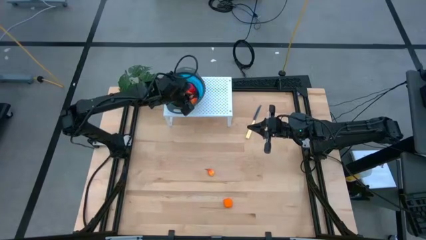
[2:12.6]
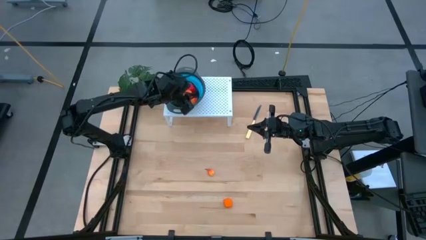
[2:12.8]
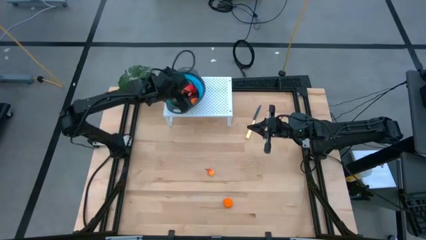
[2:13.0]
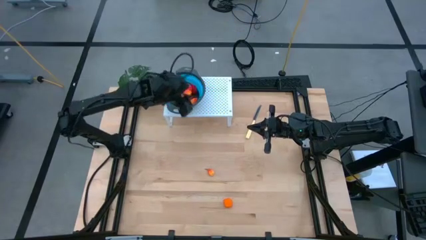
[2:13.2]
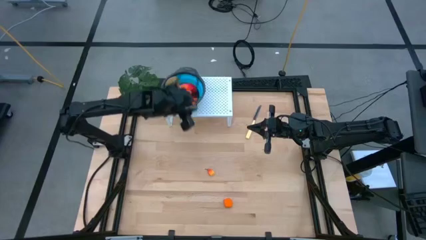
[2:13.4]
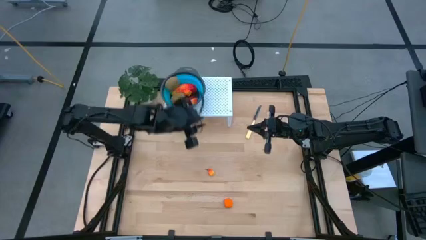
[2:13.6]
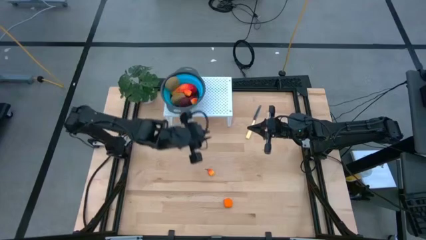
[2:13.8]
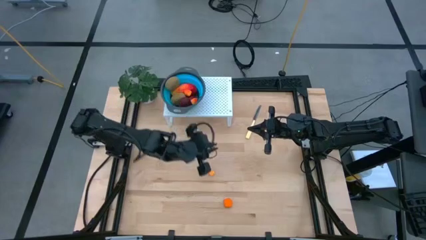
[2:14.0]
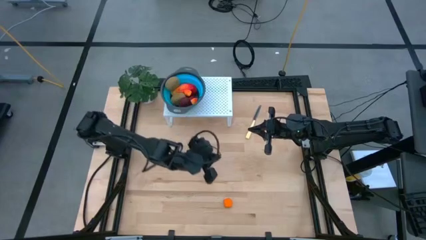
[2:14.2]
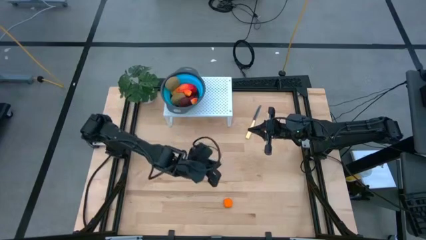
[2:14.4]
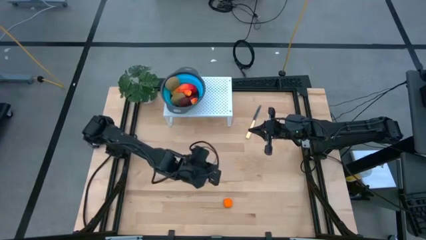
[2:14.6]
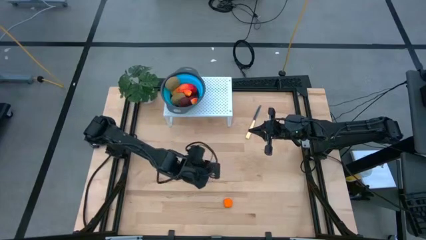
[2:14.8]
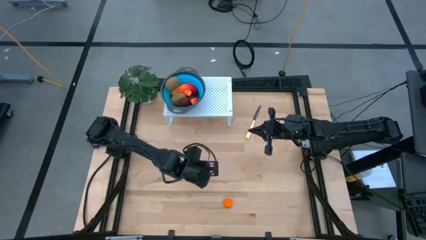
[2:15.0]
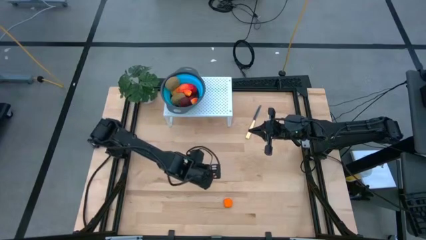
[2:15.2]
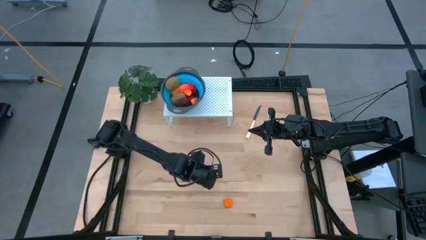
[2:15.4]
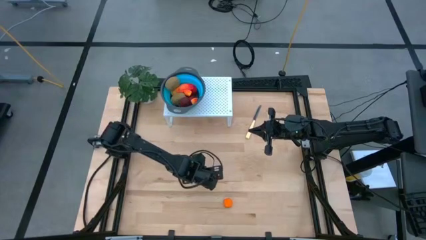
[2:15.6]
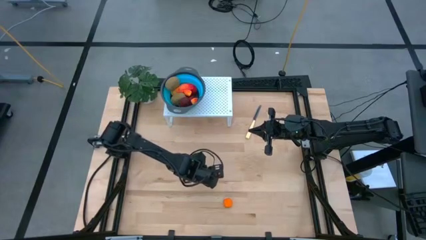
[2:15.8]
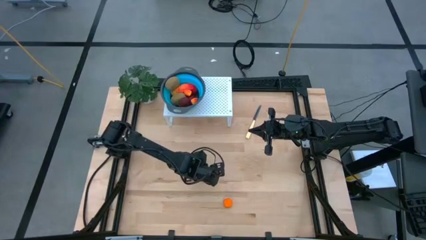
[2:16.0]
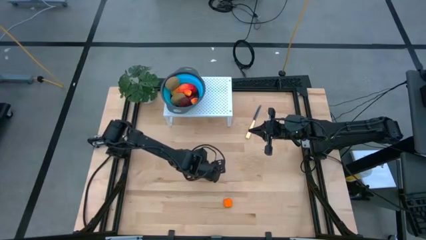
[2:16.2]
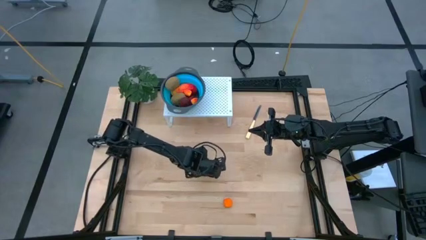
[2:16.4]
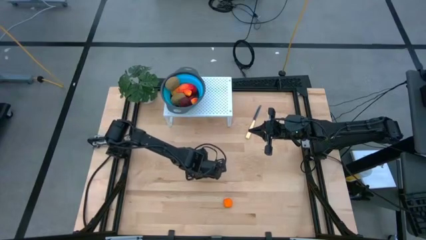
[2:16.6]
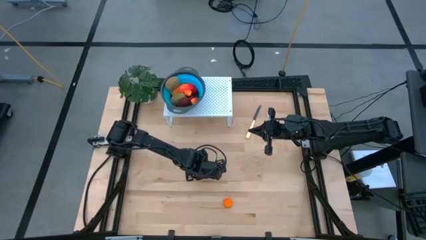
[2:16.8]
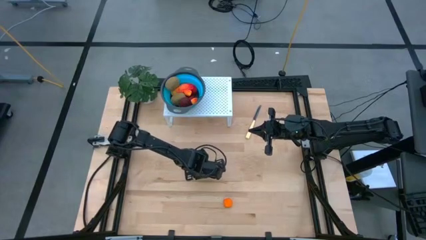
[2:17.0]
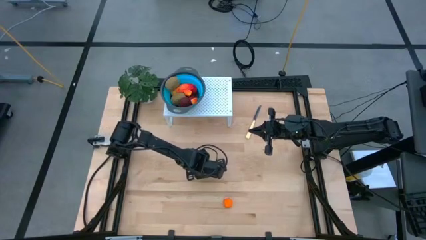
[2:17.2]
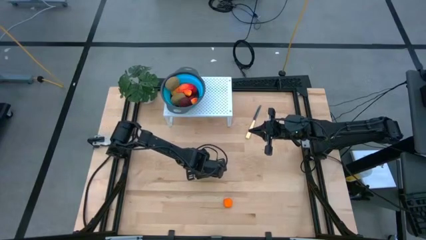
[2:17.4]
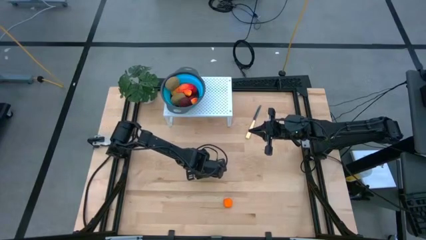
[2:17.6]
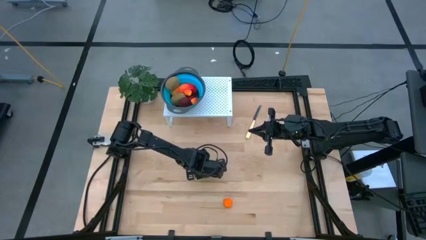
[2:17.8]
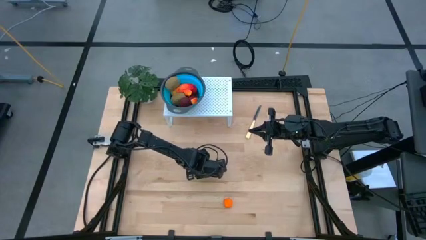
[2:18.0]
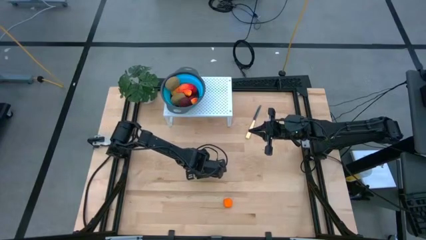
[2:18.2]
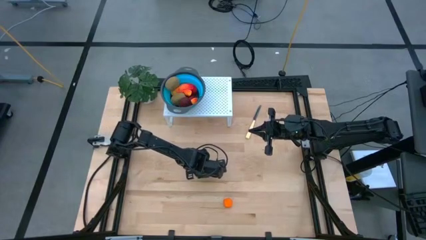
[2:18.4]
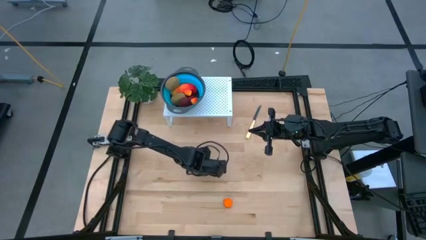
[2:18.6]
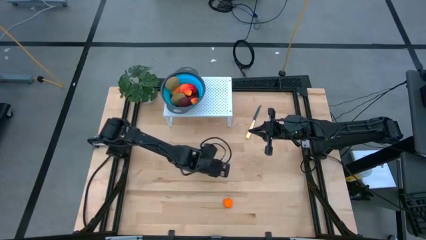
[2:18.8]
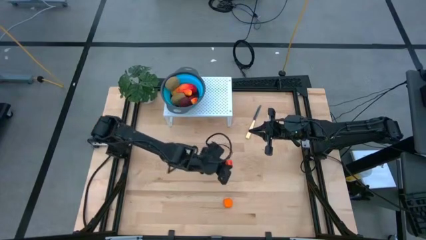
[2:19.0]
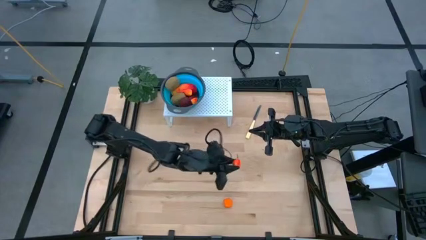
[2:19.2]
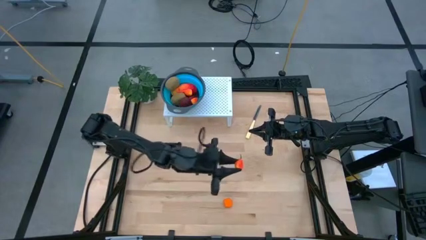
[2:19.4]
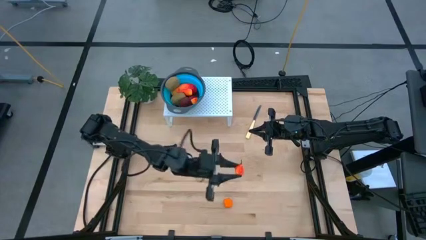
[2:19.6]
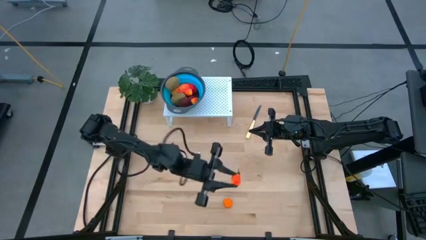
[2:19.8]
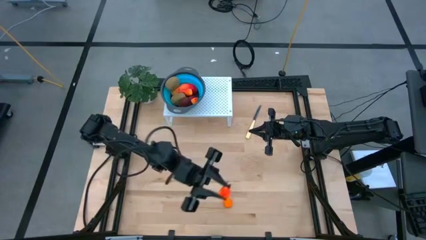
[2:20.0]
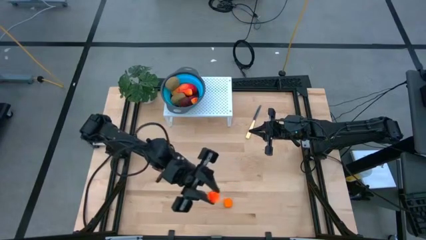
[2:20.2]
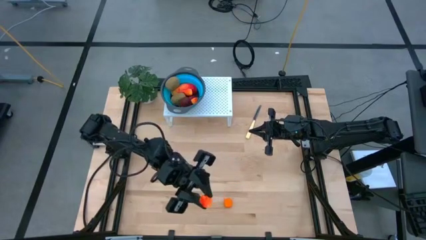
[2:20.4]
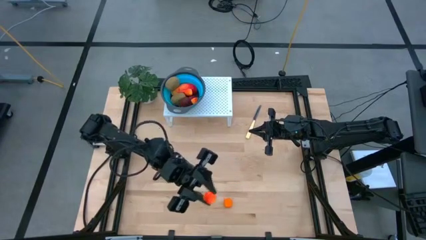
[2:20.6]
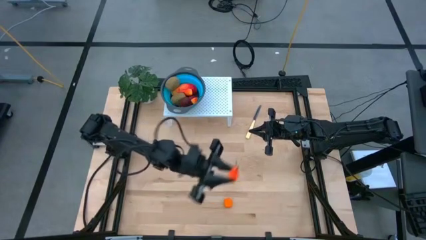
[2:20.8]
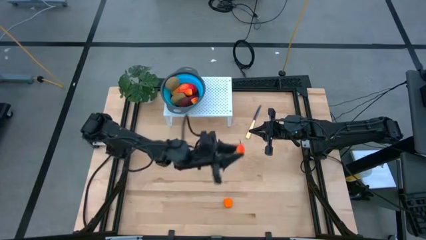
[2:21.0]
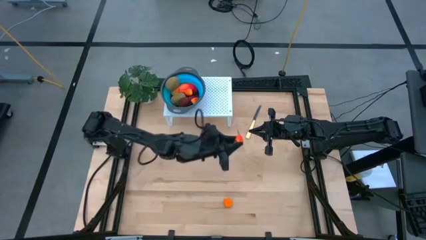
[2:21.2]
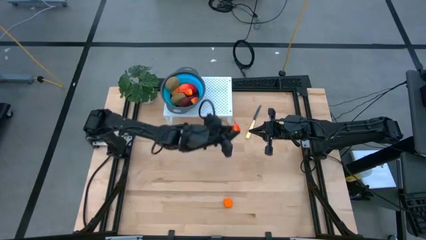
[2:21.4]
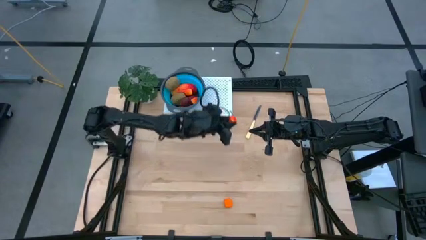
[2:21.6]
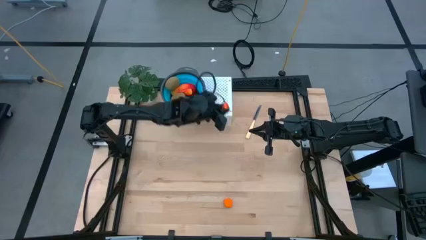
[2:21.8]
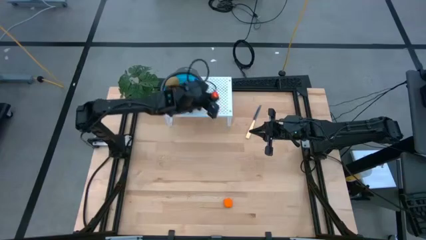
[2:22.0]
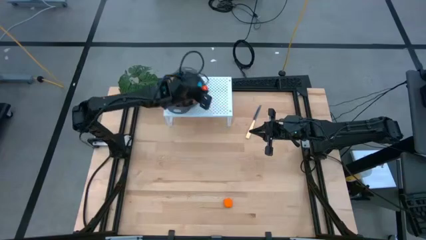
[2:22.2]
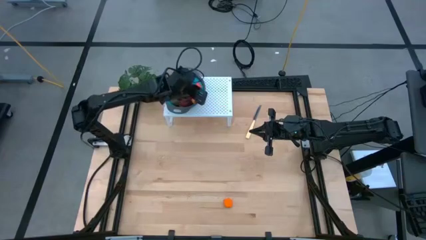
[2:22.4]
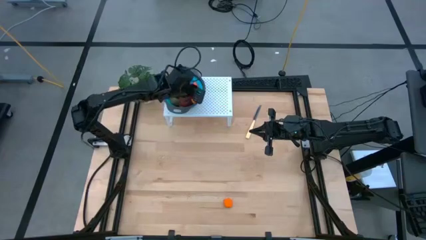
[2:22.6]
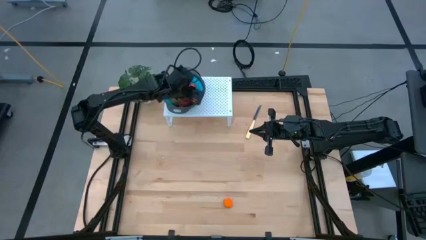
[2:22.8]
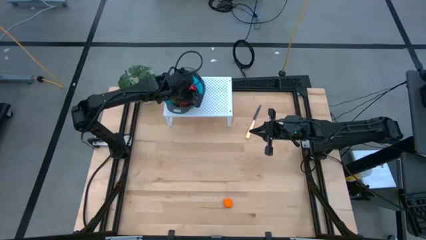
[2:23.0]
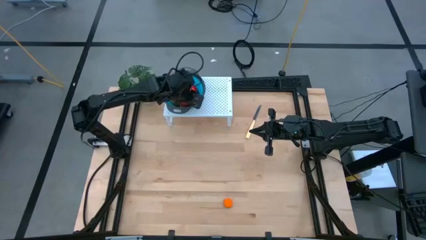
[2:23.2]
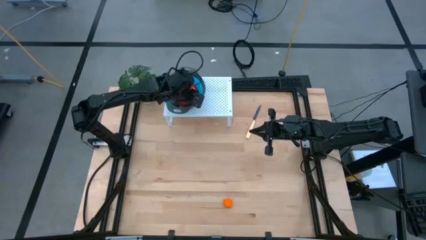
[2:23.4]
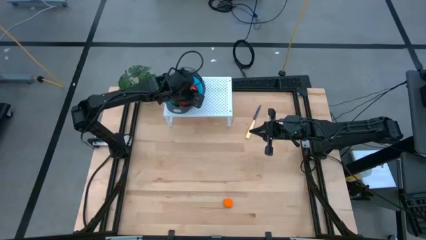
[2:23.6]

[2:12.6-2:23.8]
Task: Pick & Place Fruit
Put the peas into the strainer bowl on the shelf

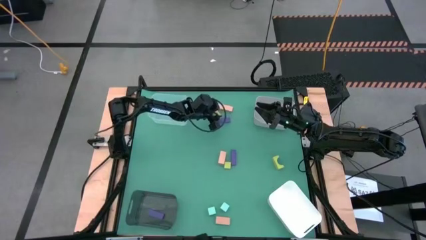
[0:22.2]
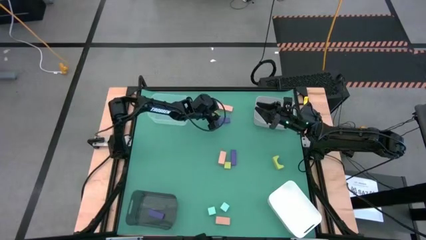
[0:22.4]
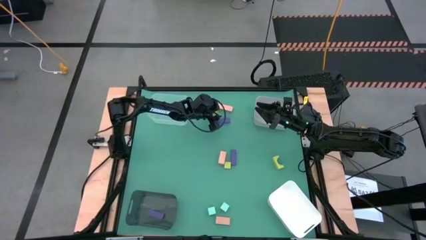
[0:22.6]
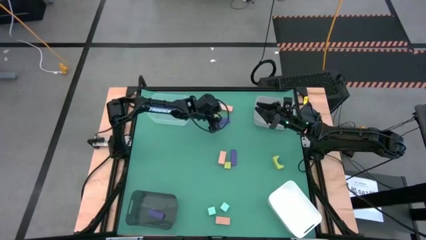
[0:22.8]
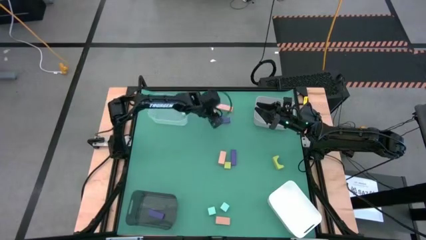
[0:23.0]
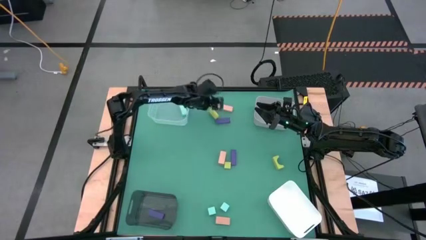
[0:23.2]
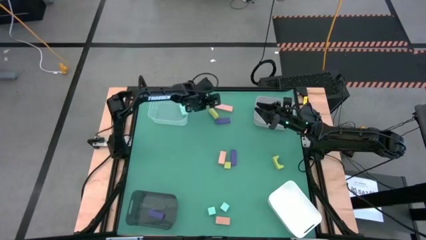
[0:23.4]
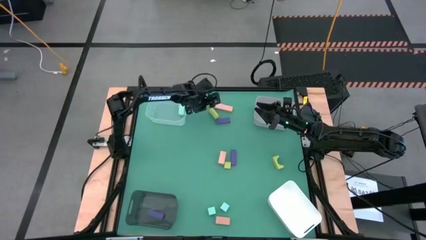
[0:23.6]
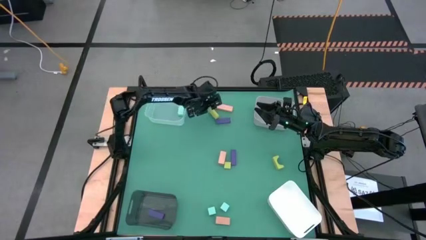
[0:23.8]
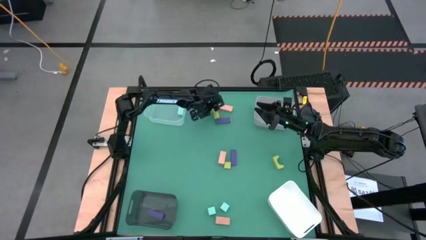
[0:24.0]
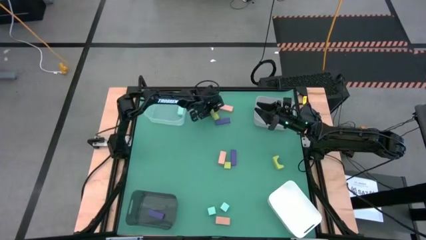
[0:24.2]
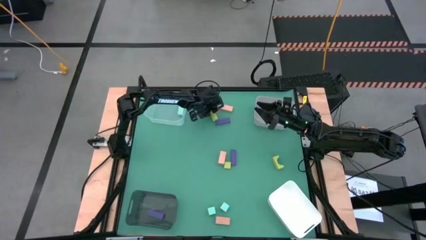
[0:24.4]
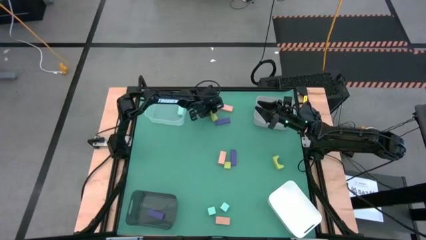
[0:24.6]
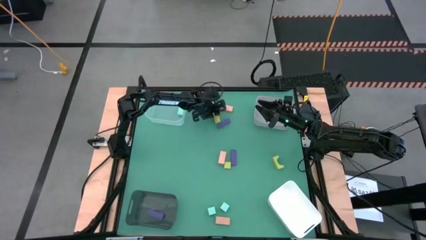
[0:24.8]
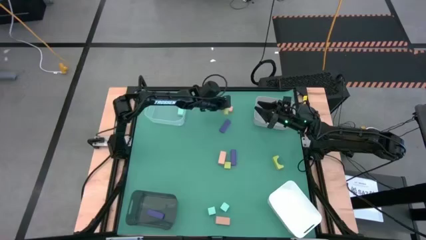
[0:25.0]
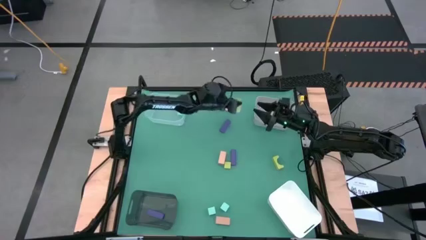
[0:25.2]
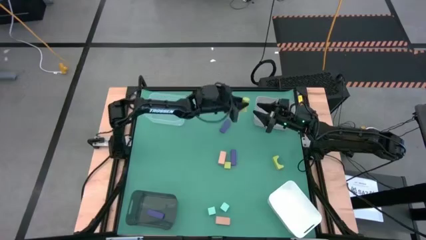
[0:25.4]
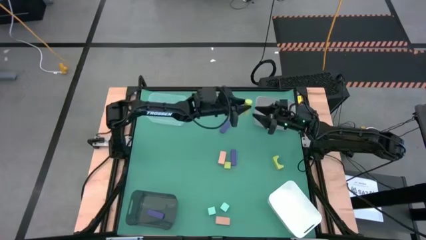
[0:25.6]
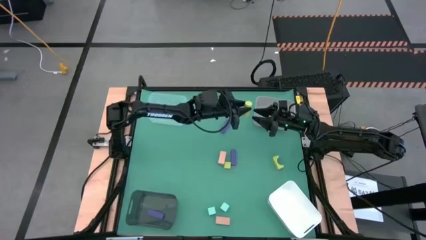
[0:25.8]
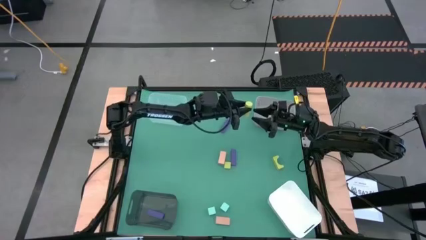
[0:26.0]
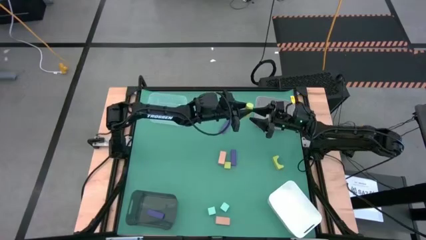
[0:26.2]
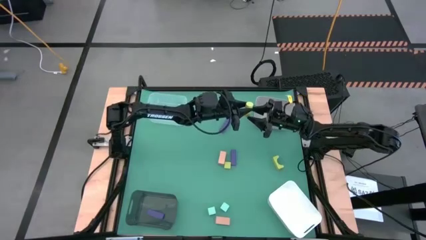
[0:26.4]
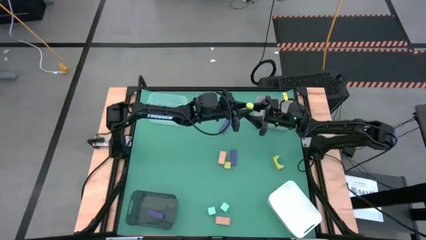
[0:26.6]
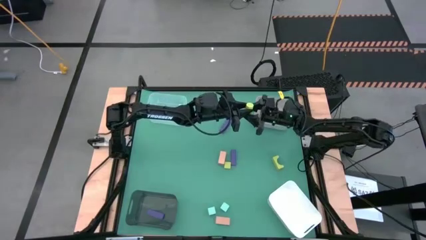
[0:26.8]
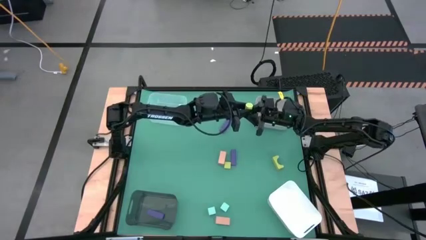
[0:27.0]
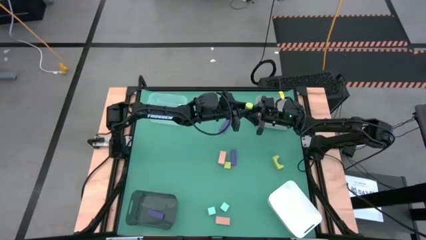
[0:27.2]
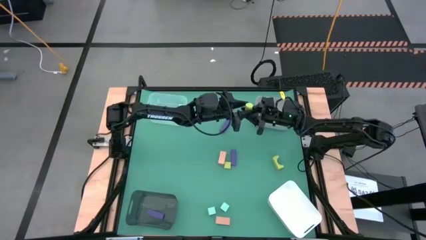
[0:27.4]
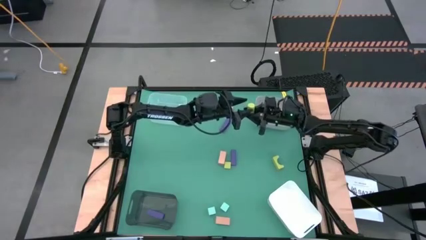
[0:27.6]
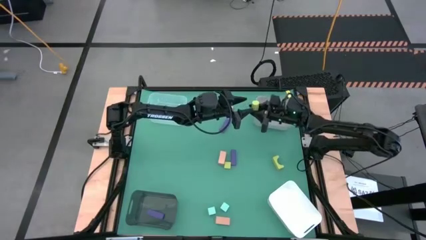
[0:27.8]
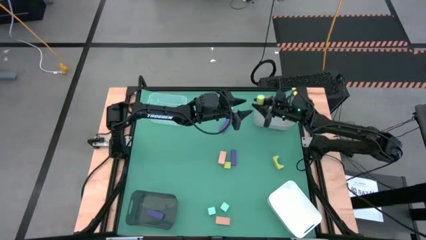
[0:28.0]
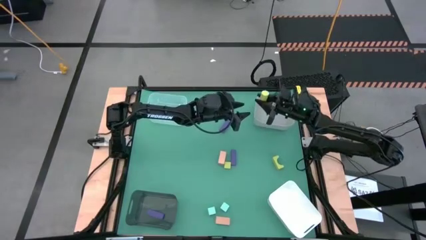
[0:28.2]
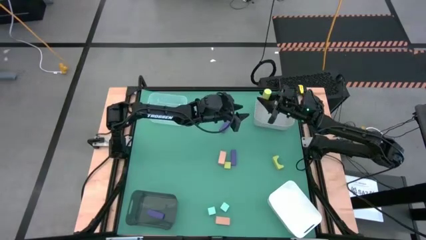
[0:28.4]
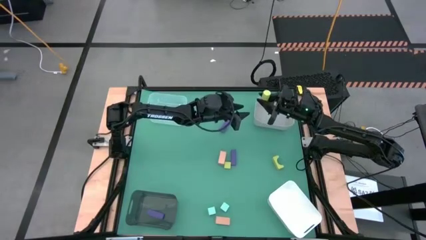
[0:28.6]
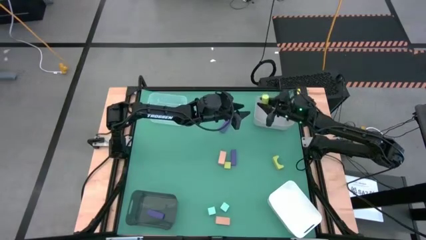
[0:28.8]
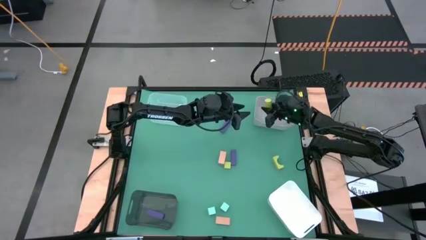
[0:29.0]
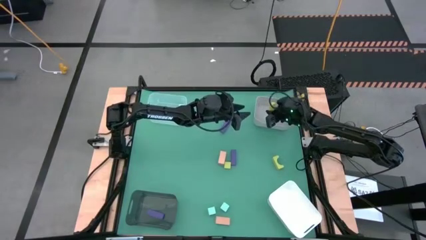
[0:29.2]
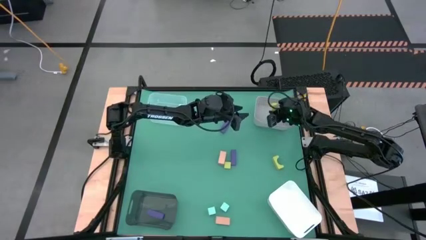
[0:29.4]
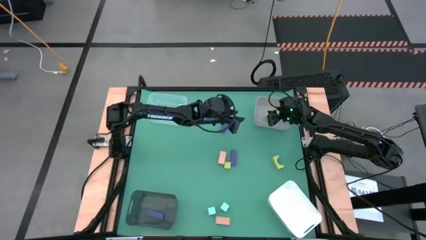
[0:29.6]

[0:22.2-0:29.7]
Task: Sort & place blocks by color
Put the top light green block into the gray bin
